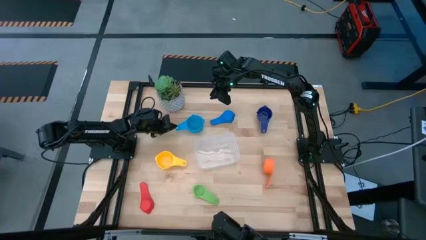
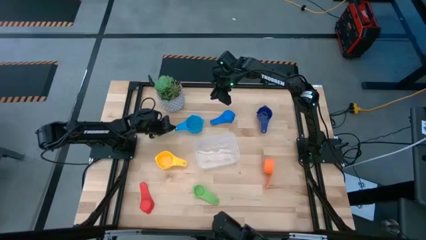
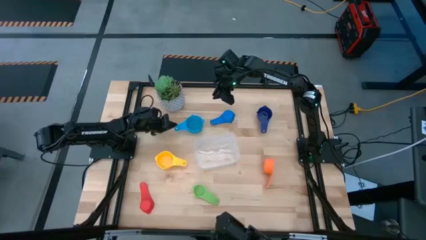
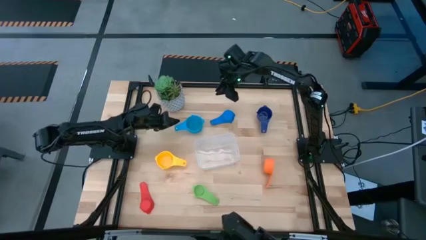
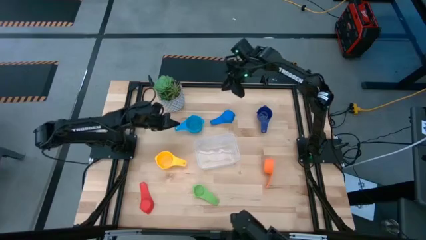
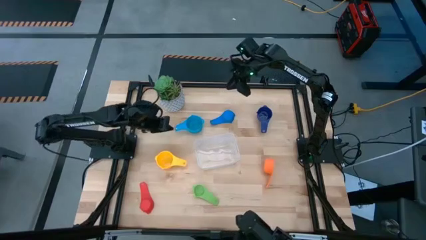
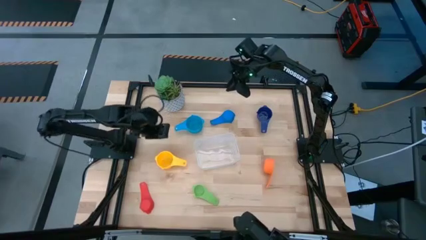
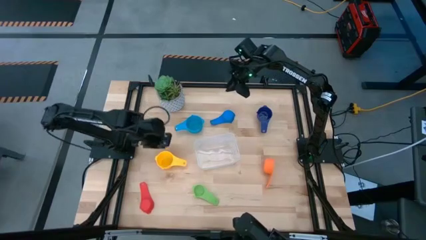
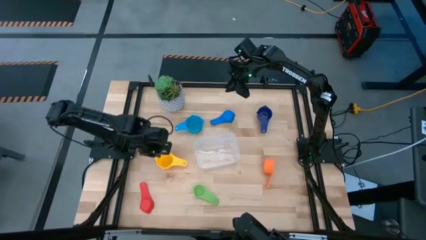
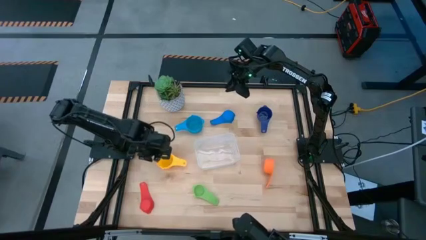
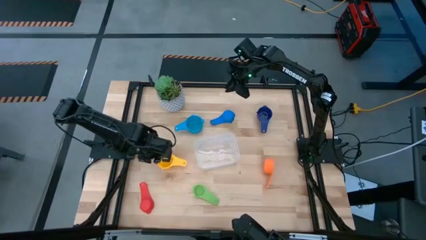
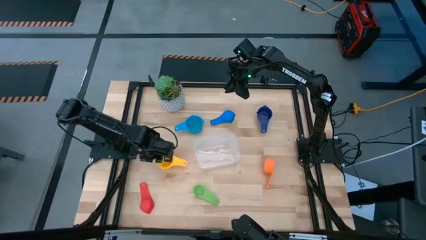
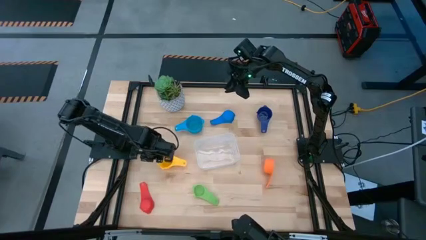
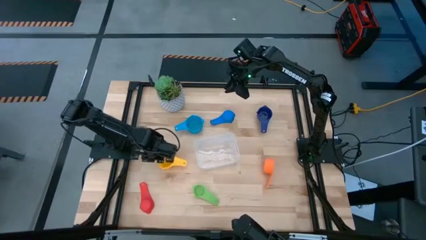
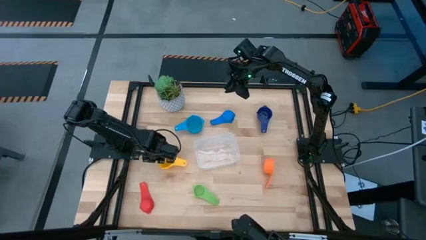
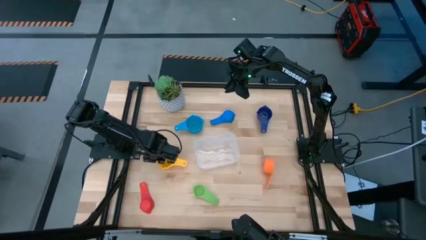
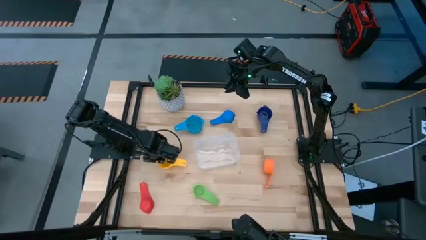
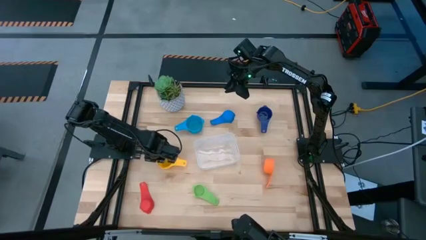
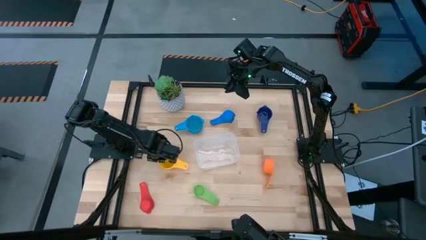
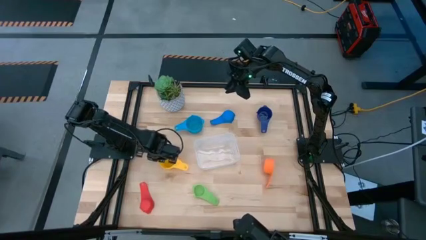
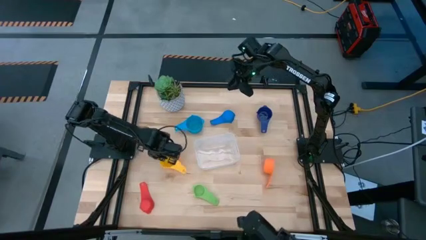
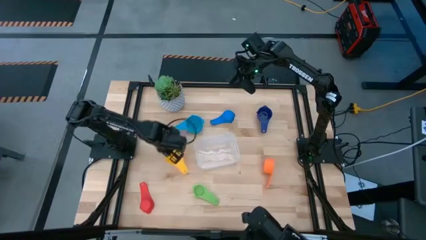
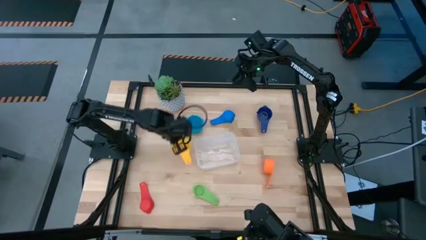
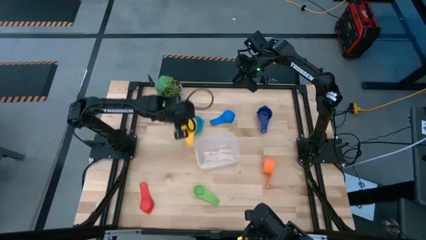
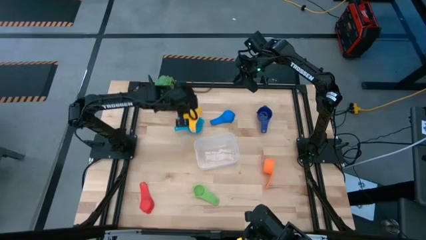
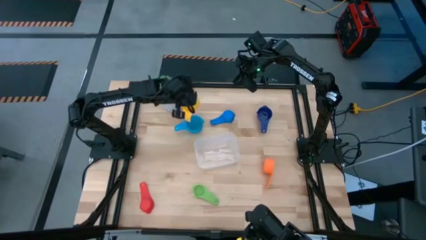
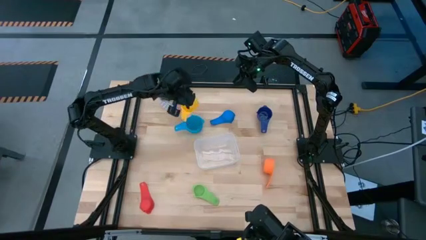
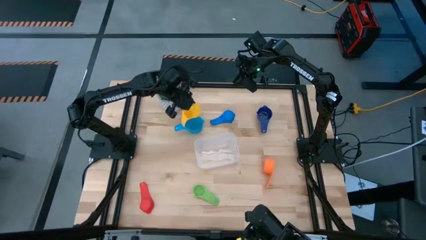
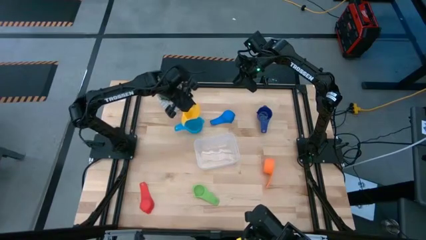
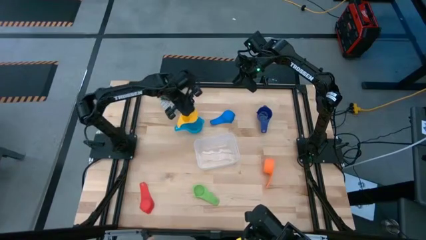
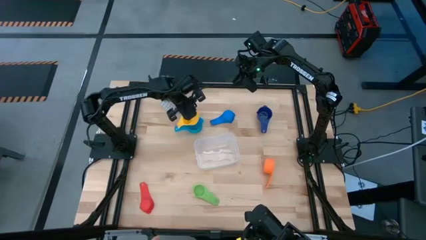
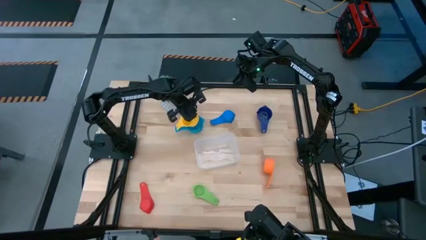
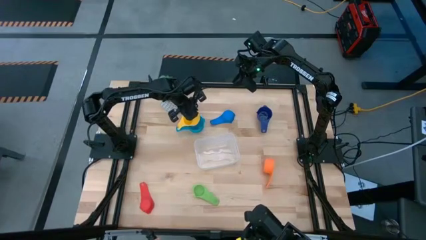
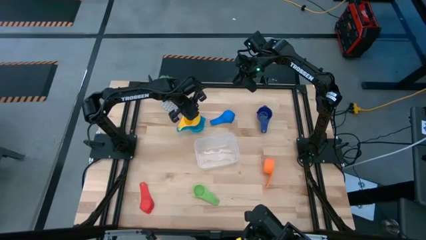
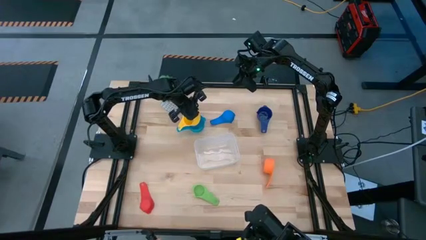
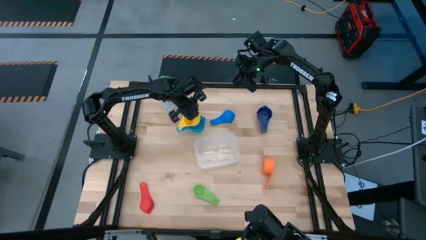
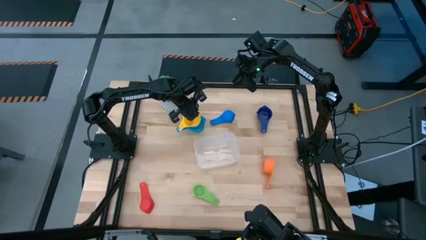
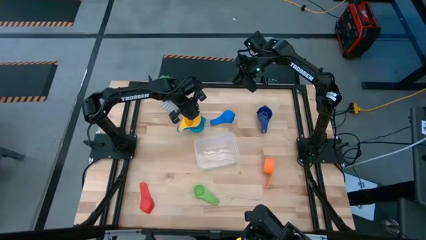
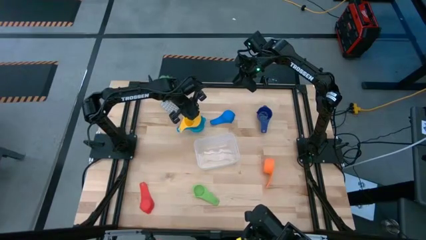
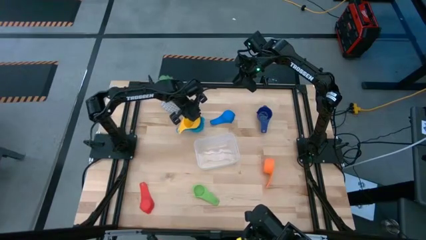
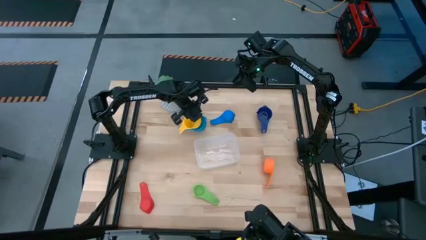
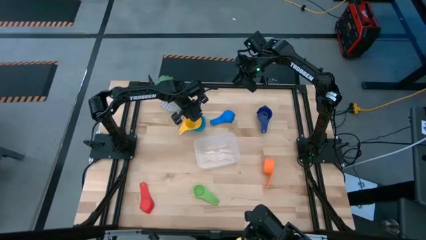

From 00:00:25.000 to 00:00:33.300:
Task: Nest measuring cups in basket
Stack the yellow measuring cup on top of the light blue measuring cup

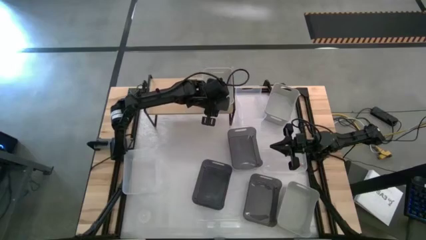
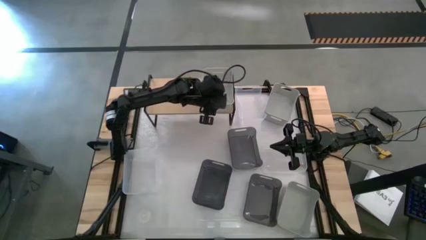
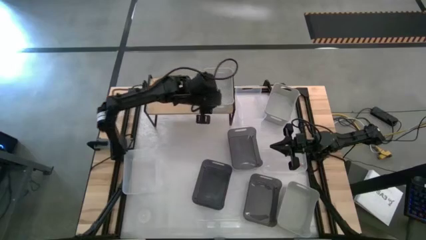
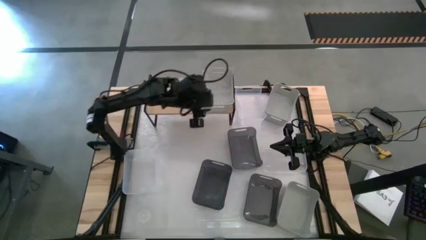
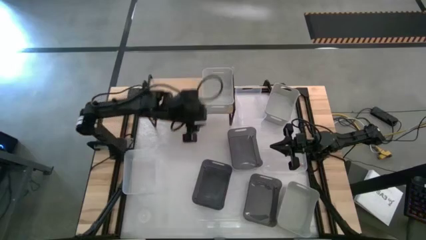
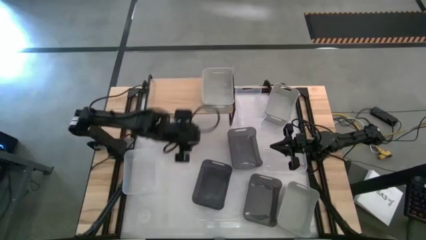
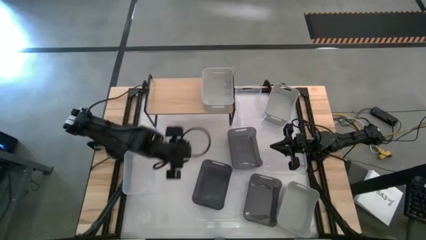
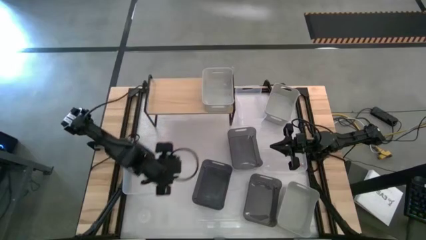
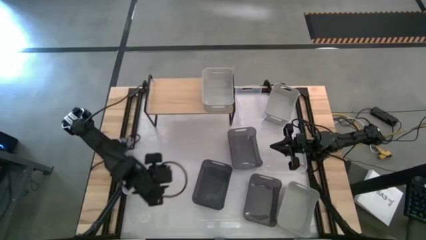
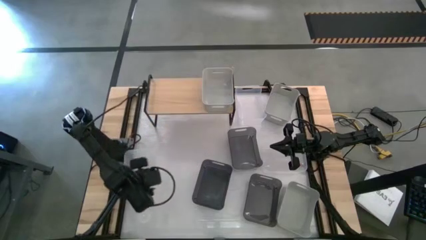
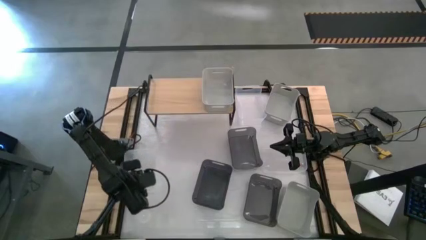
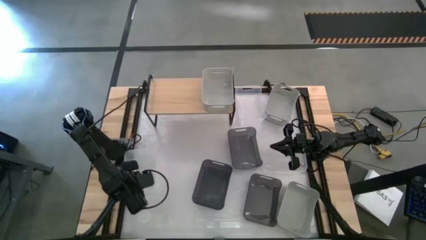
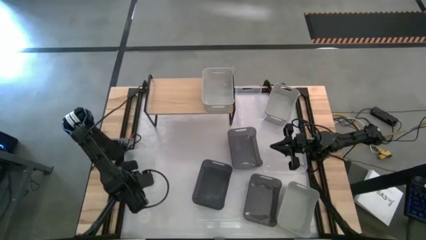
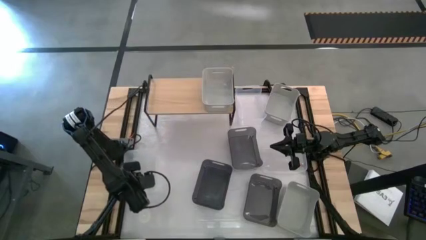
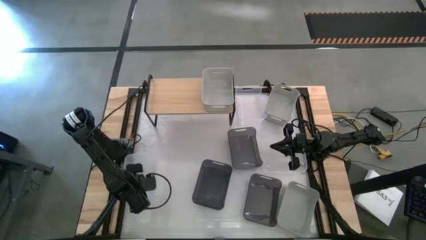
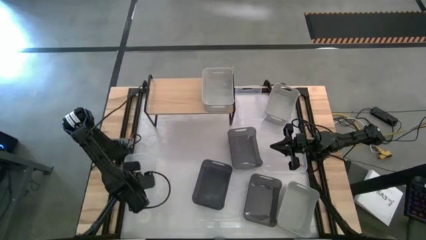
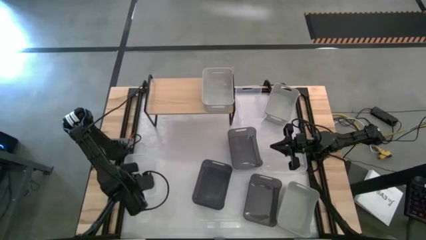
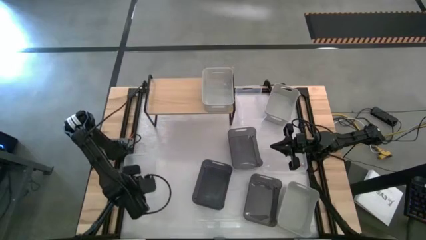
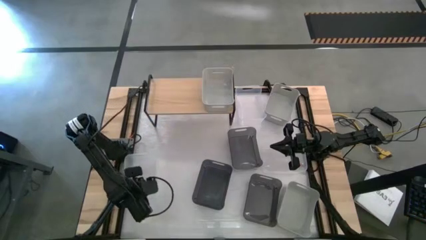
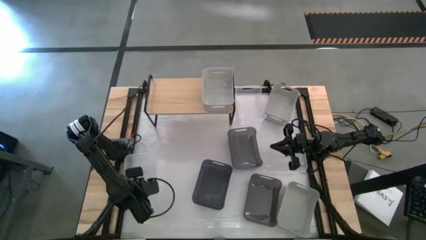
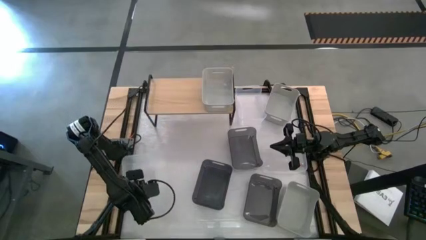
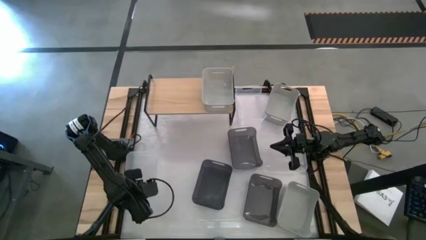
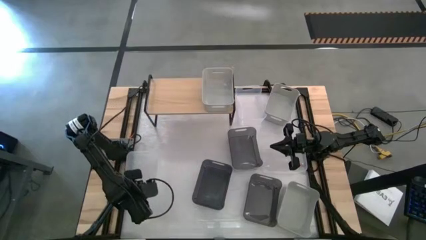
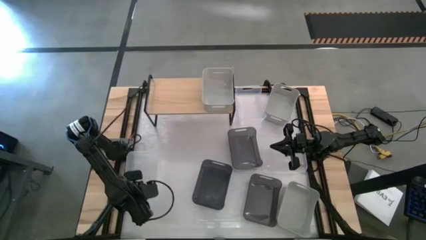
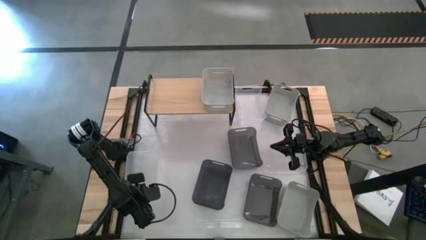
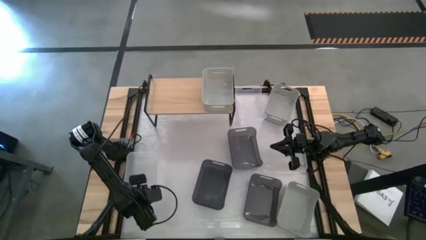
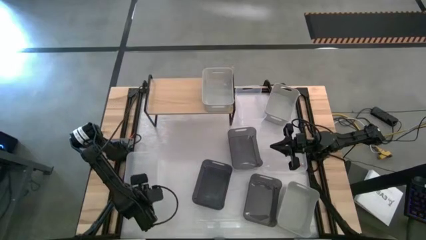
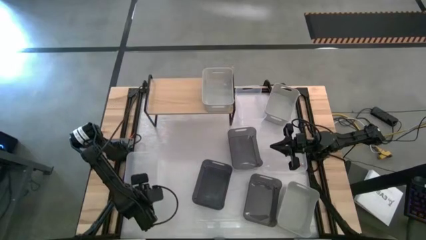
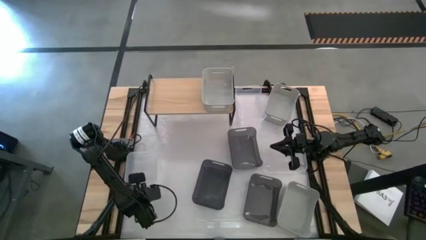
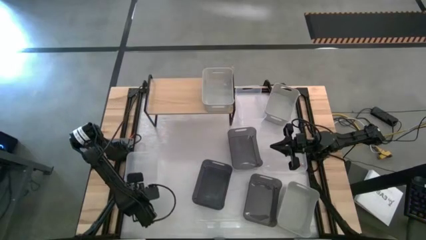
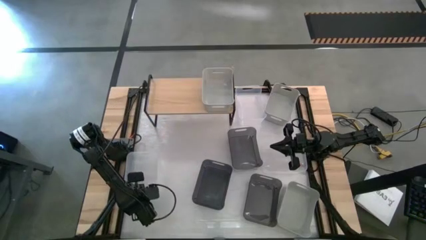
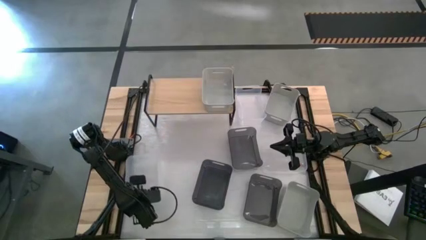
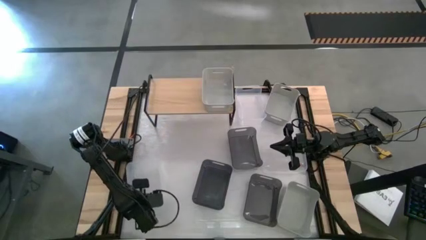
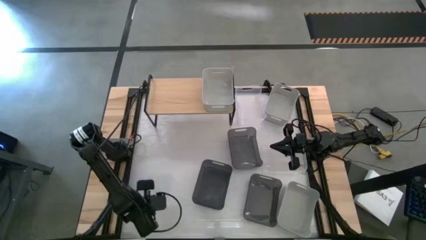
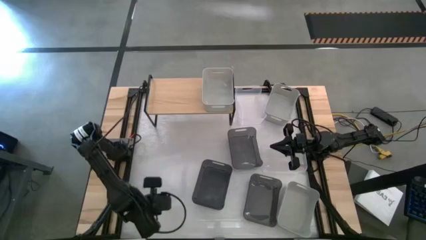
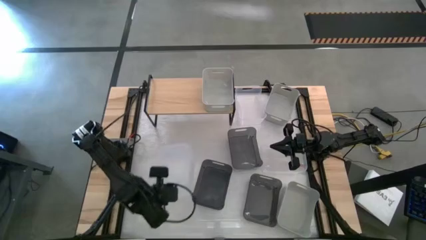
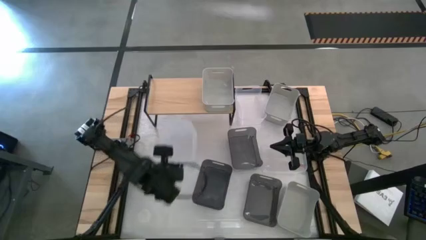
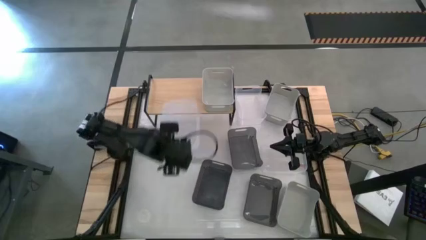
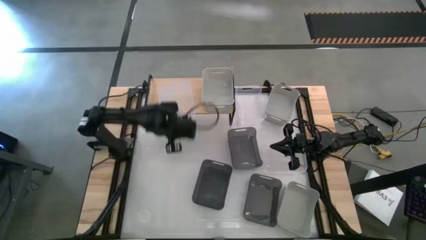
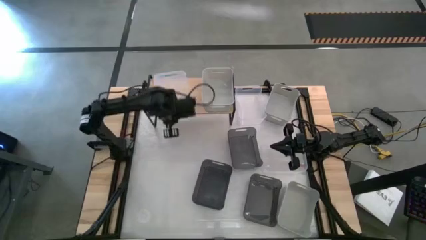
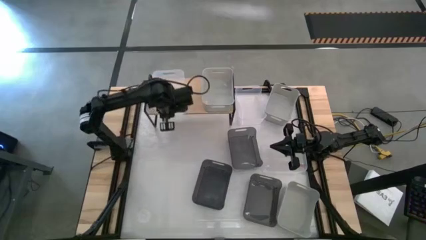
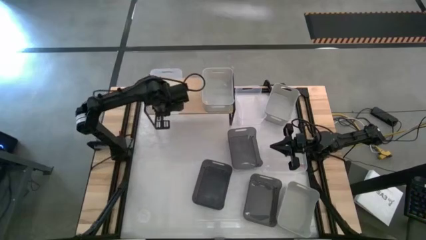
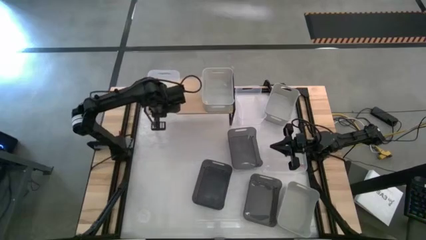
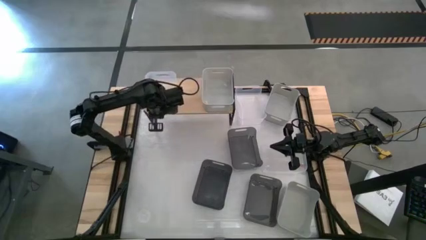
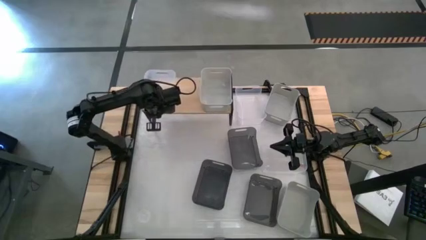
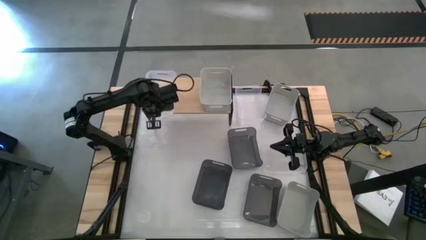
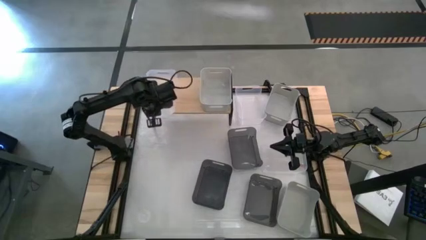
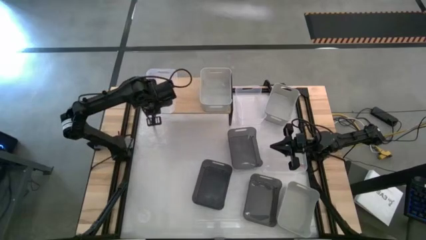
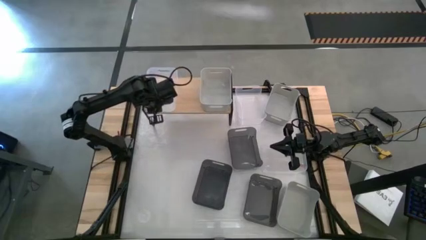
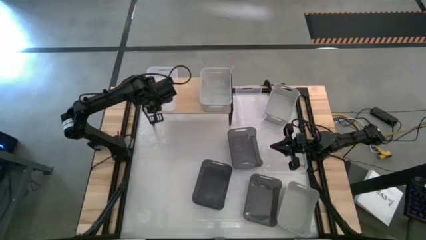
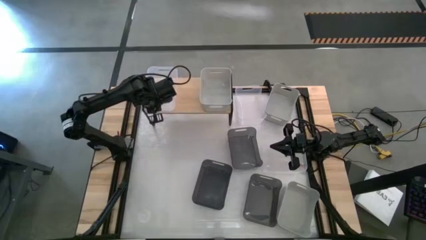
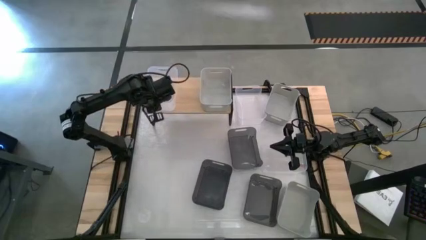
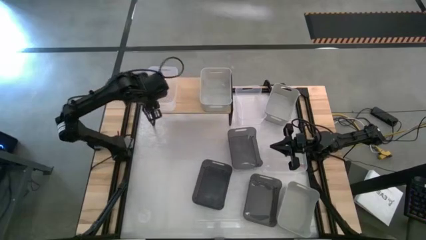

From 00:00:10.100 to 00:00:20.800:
Task: Stack baskets on shelf by color
Put the left transparent bin on the shelf
